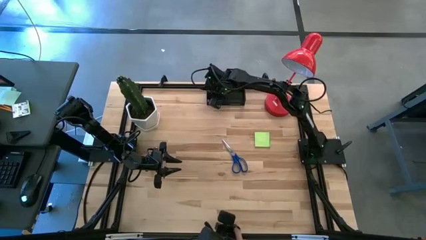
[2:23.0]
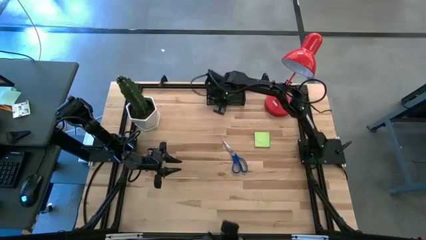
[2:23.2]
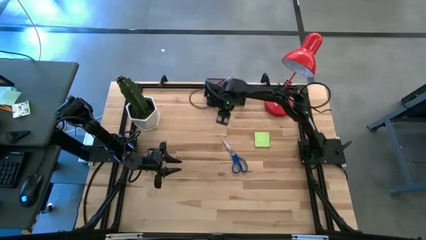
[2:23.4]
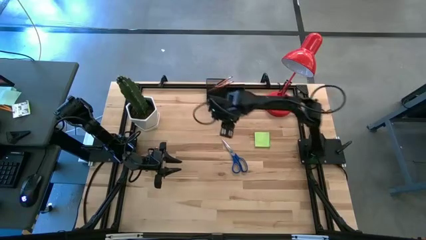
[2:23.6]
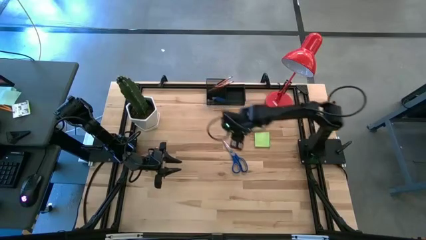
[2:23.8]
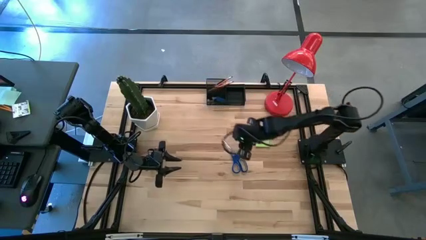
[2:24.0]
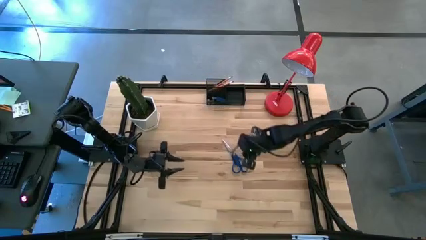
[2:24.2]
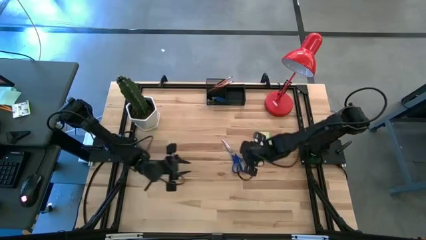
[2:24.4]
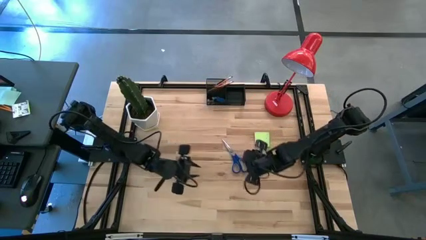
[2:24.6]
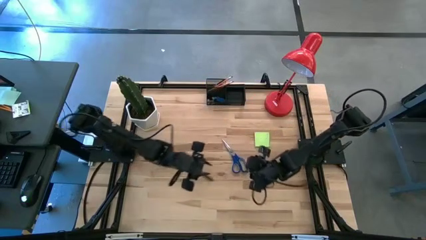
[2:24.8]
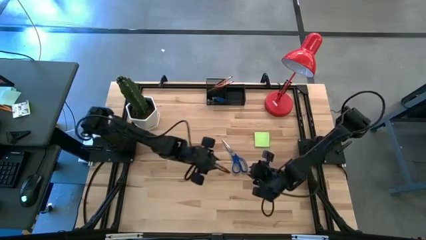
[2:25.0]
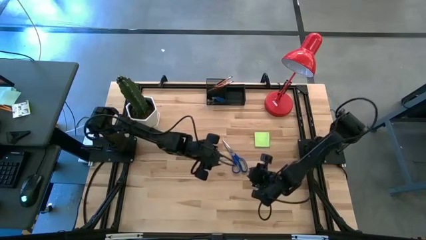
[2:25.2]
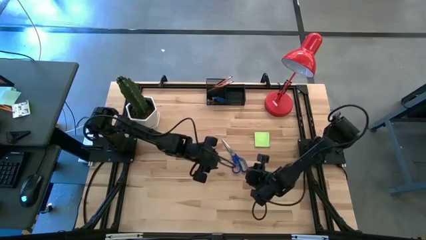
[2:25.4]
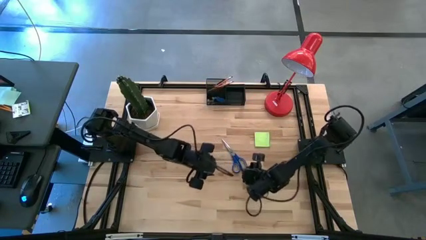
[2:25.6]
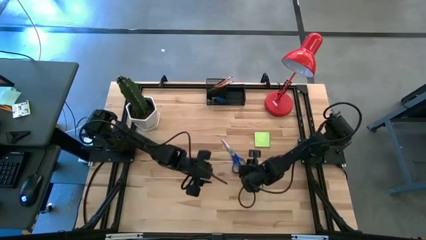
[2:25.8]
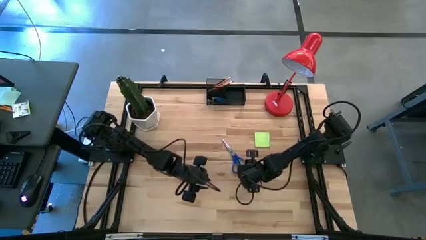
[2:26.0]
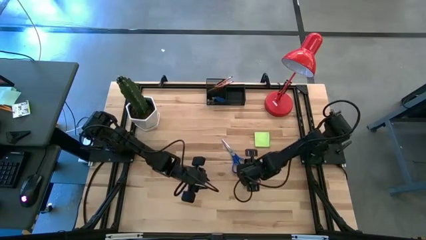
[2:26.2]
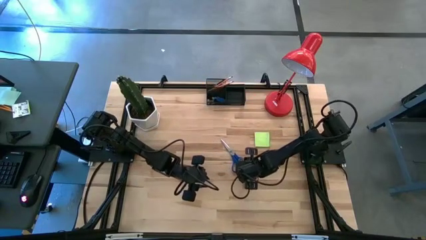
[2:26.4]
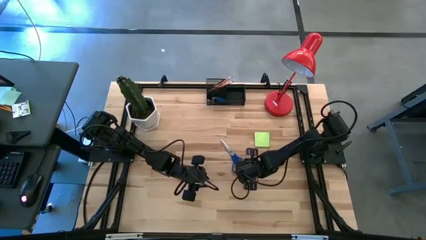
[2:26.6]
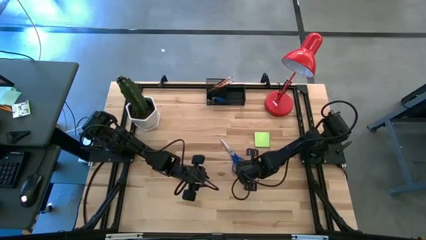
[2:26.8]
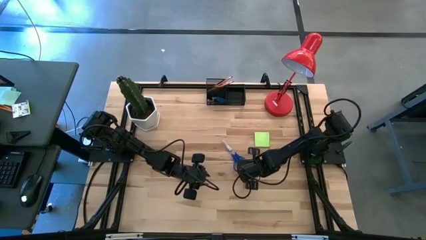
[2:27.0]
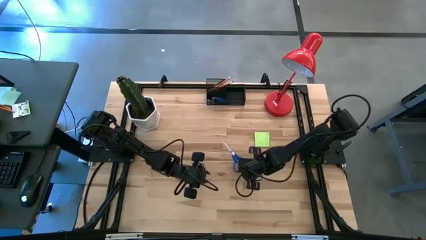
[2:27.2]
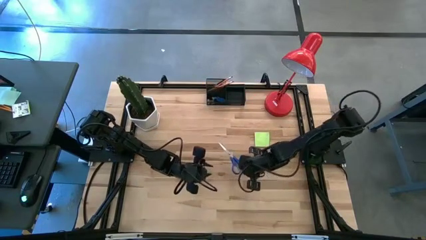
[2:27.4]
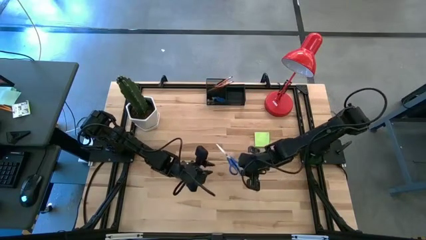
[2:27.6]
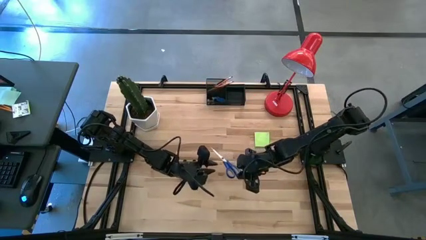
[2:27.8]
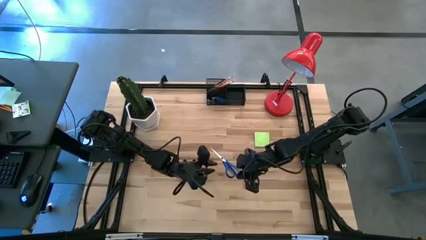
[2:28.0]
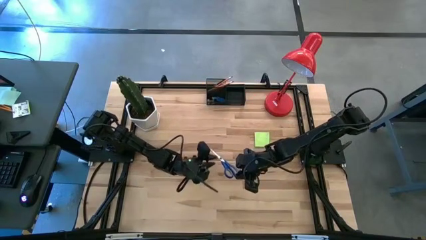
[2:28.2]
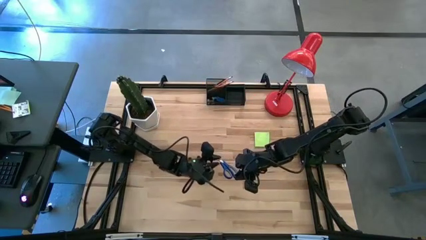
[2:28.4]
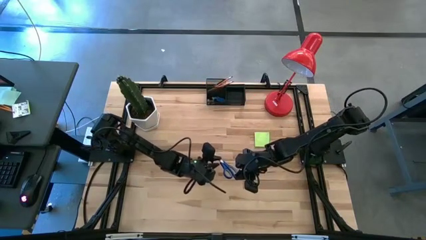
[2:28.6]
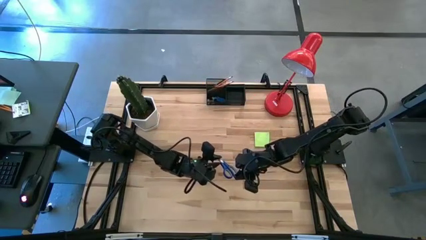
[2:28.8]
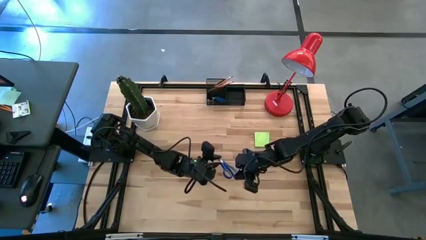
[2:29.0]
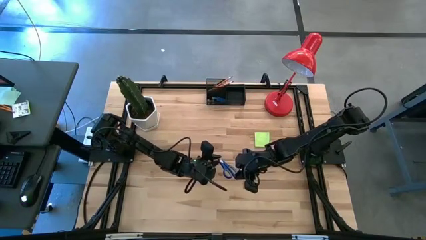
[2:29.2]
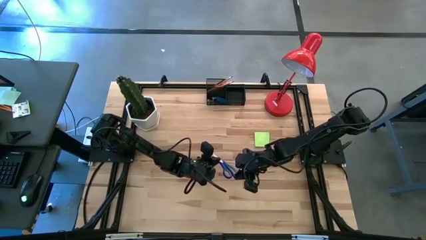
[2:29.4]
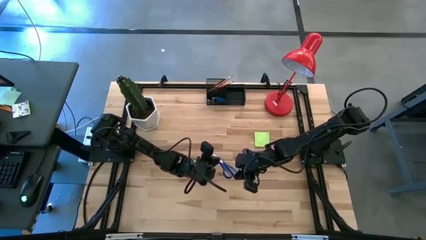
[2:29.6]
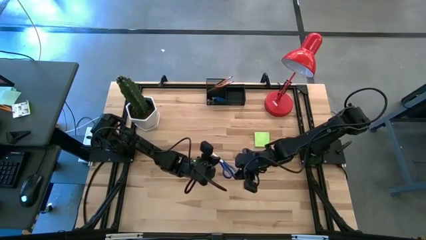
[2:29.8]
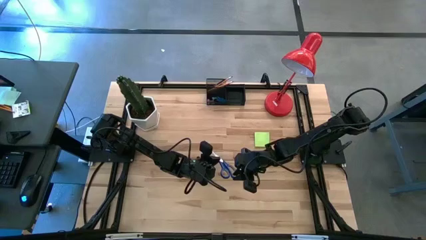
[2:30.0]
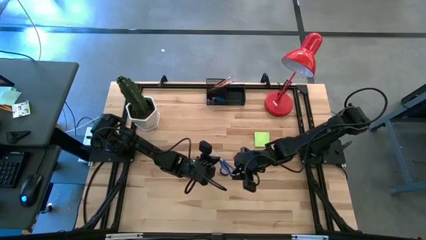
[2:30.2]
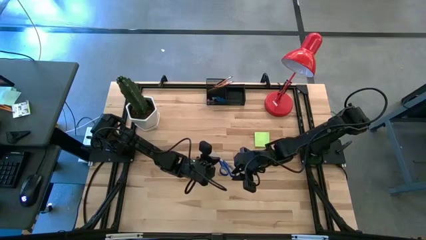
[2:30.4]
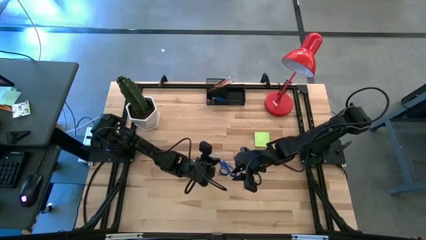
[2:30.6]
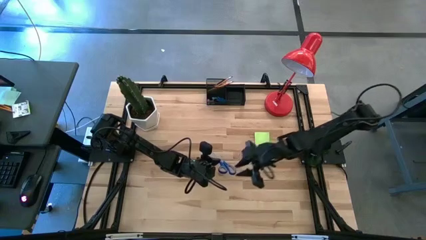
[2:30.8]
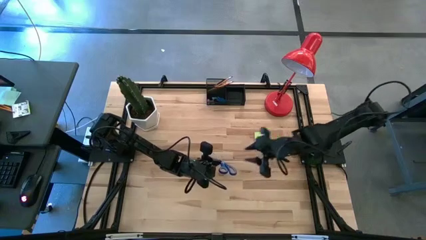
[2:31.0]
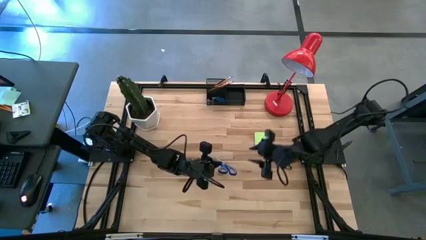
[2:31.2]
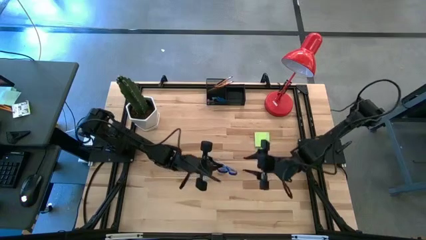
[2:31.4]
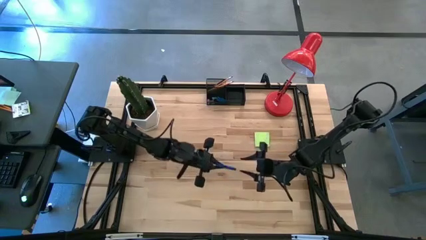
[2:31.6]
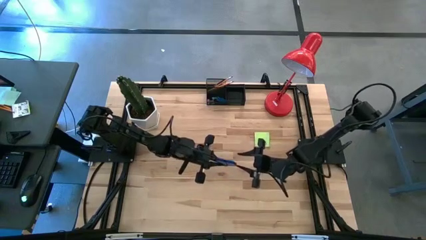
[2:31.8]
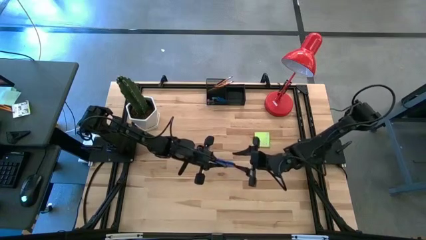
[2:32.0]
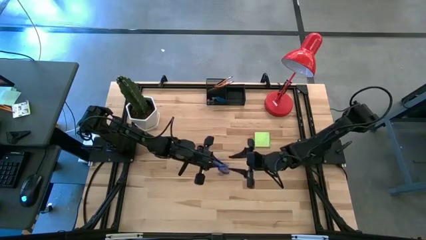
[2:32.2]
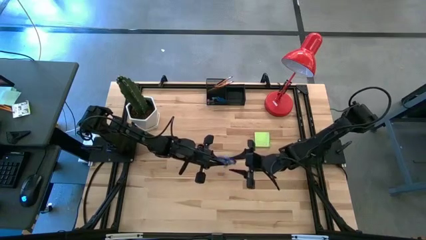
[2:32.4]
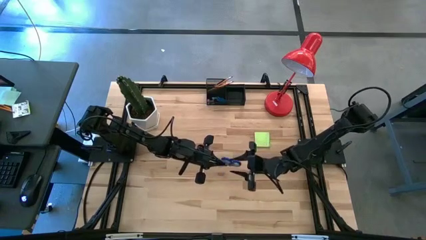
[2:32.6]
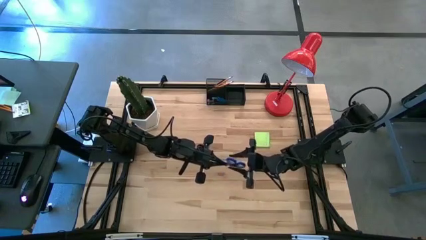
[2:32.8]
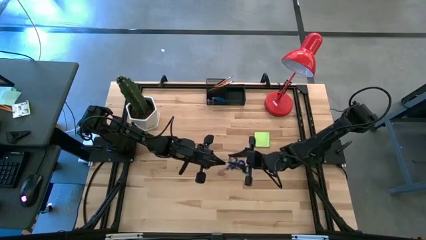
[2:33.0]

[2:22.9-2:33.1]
Task: Pick and place office supplies into organizer
Put the blue scissors into the top left section of the desk organizer

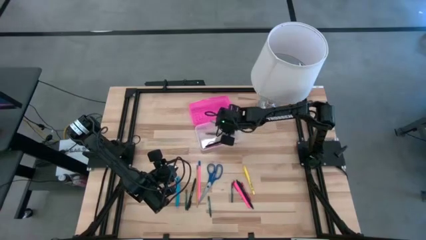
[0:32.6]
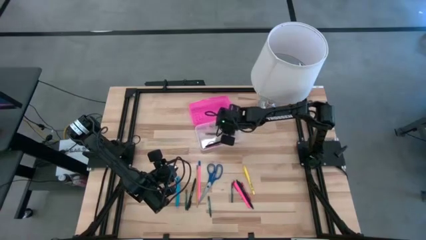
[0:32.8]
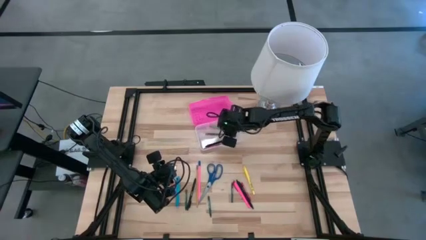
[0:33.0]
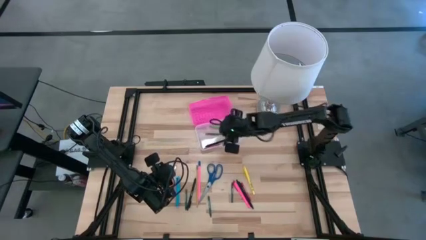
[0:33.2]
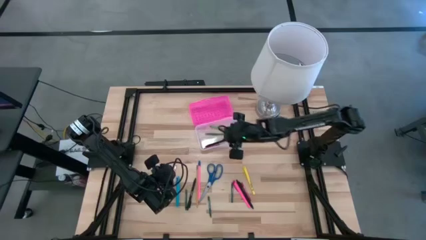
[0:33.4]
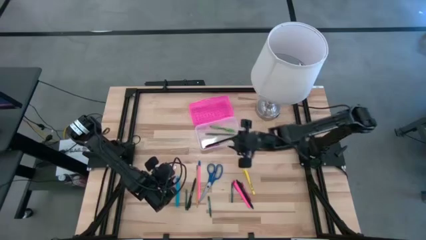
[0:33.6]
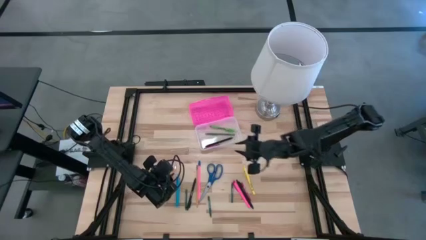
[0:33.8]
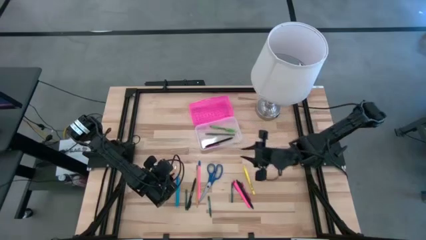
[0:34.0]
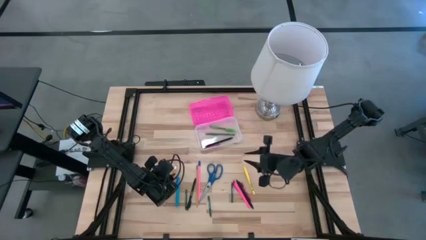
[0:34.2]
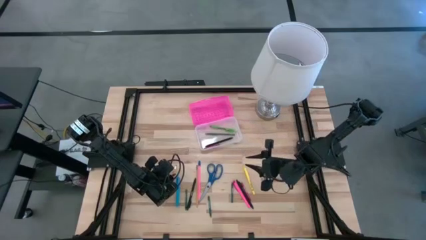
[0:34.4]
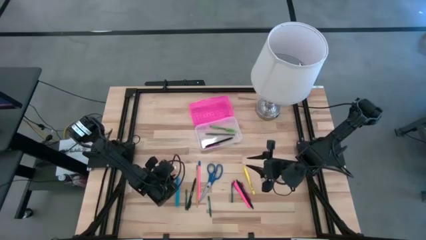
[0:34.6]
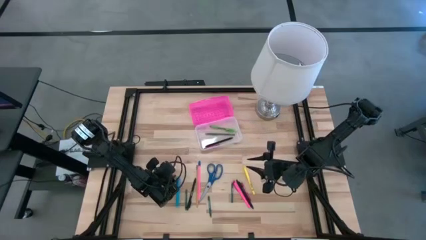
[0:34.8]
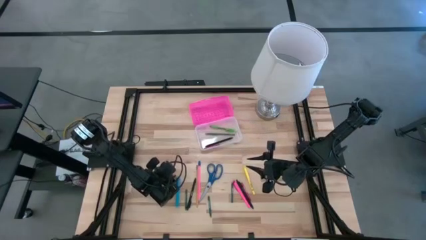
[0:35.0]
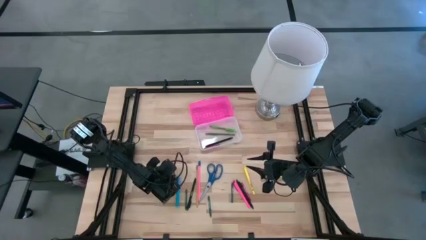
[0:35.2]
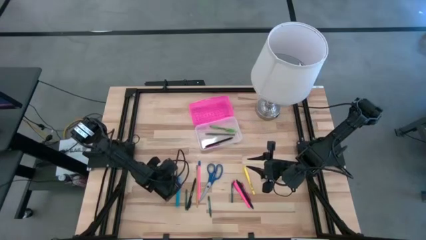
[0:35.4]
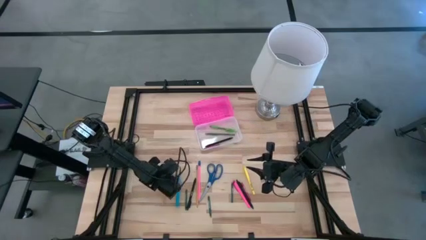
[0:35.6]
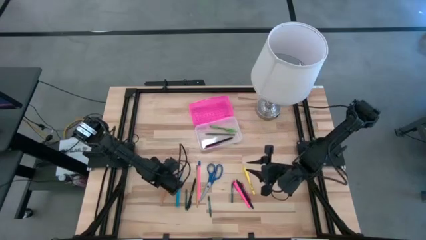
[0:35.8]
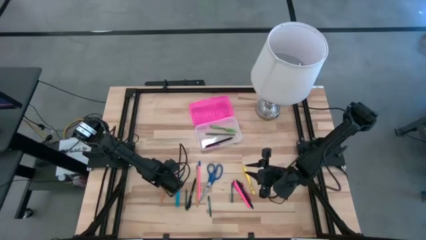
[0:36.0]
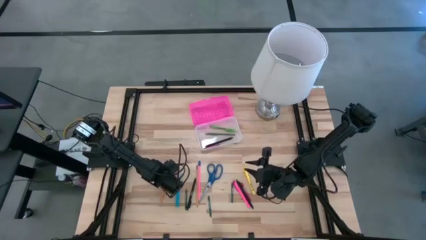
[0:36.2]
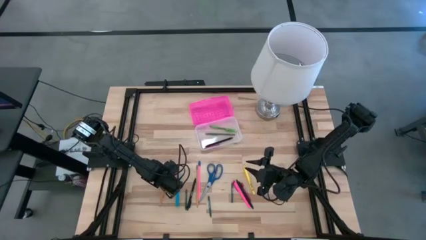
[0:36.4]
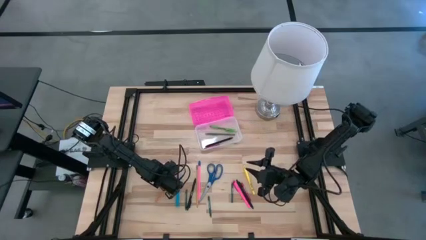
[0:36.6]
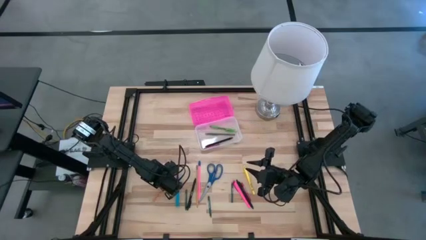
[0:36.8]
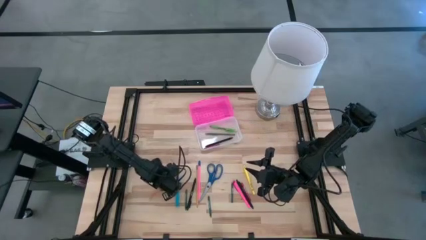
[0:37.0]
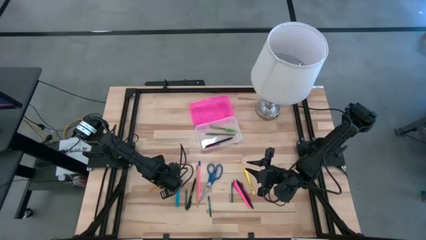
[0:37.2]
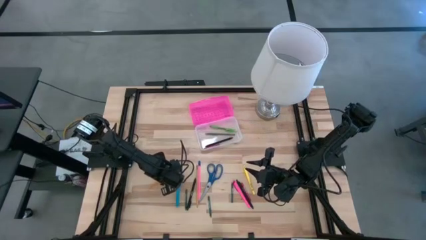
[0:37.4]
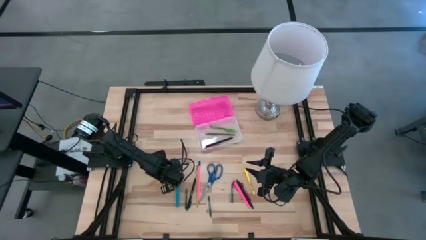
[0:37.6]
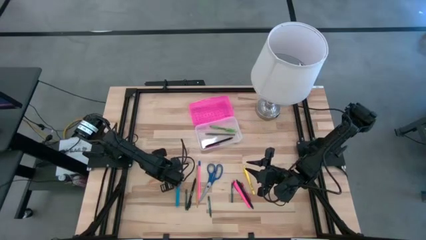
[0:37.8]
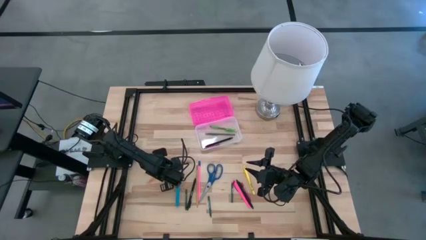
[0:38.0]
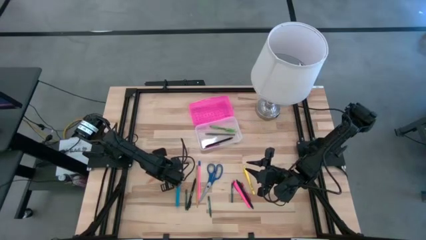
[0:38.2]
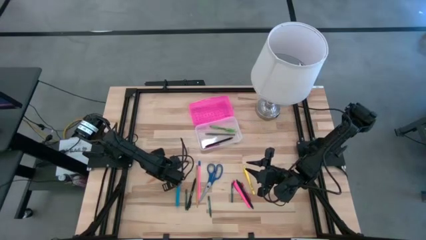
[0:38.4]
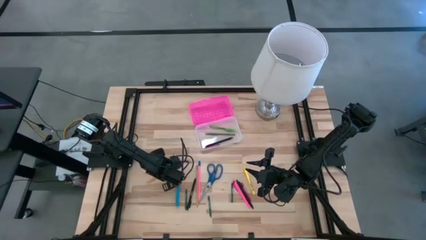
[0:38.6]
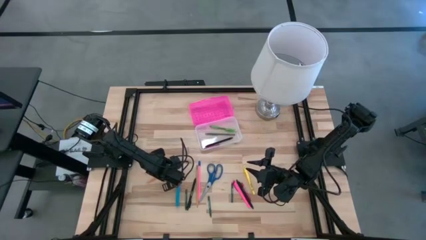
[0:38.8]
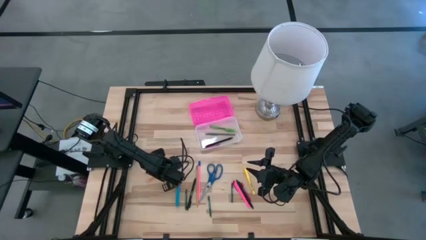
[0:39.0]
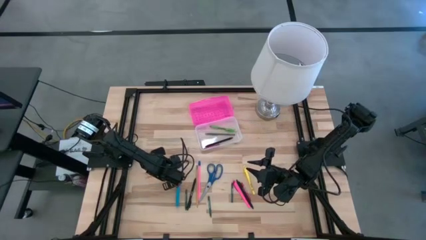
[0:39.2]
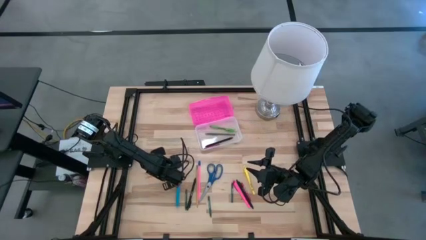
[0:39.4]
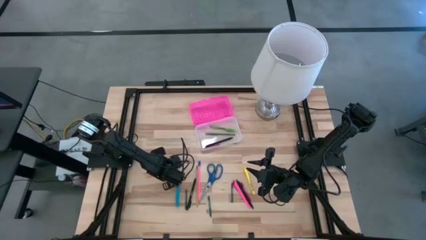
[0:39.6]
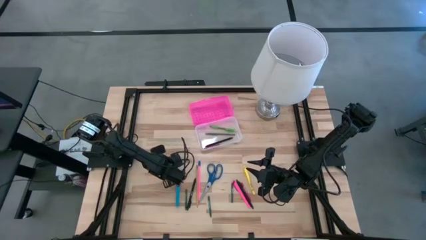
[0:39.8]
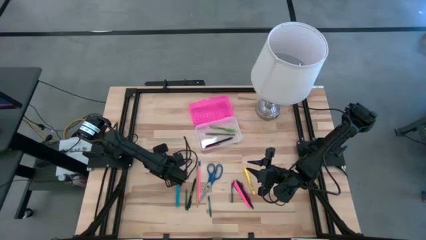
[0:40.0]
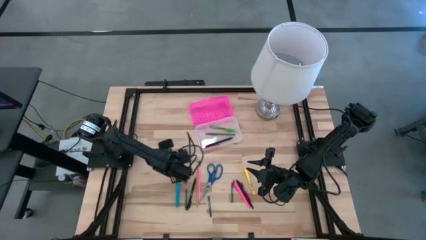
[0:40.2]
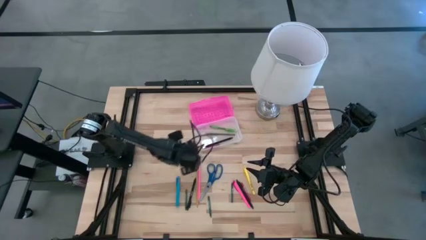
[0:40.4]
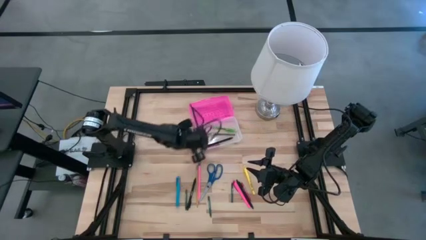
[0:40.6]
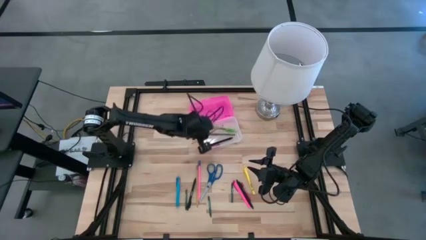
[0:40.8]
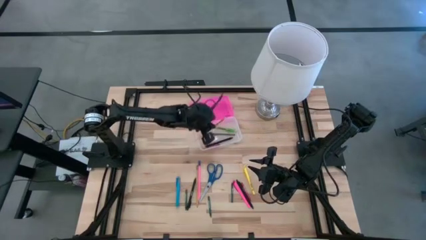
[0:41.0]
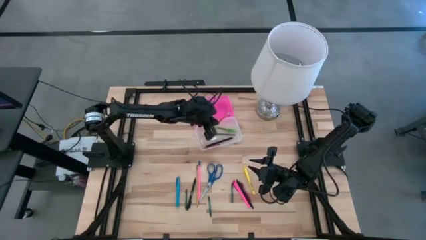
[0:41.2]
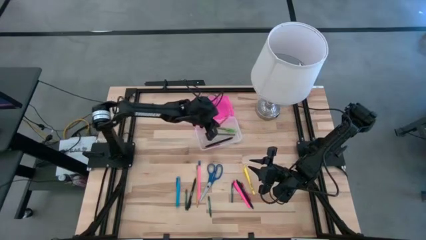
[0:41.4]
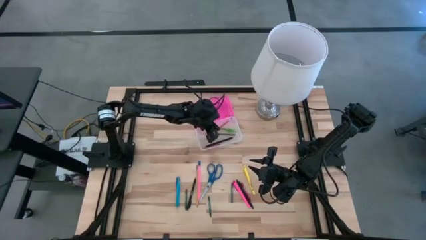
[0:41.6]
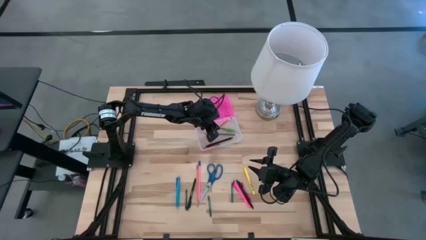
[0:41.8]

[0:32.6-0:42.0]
Task: Pick & place school supplies into a supply box
Put the orange pencil into the pink supply box
